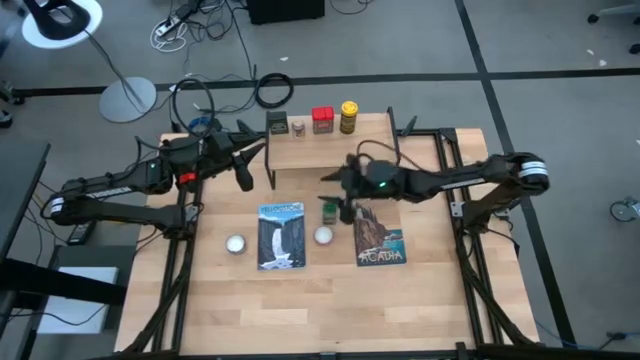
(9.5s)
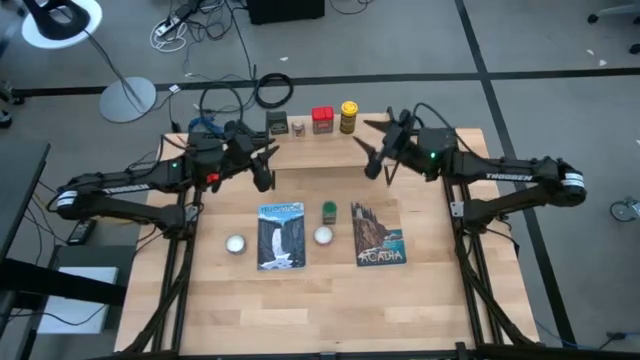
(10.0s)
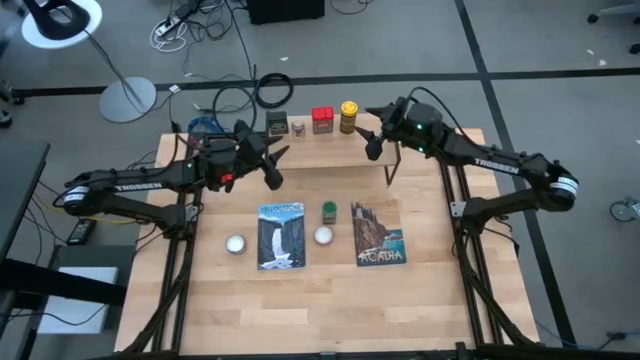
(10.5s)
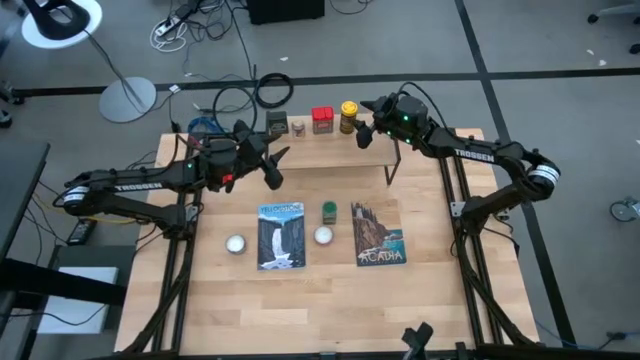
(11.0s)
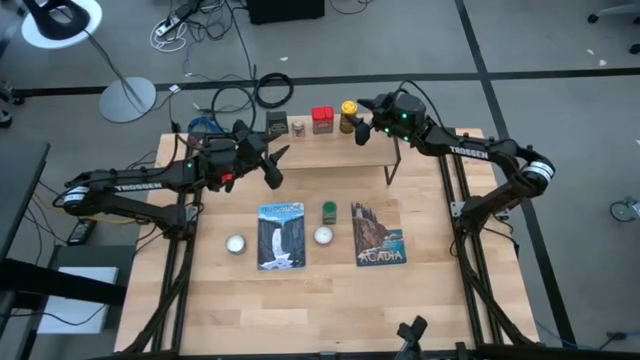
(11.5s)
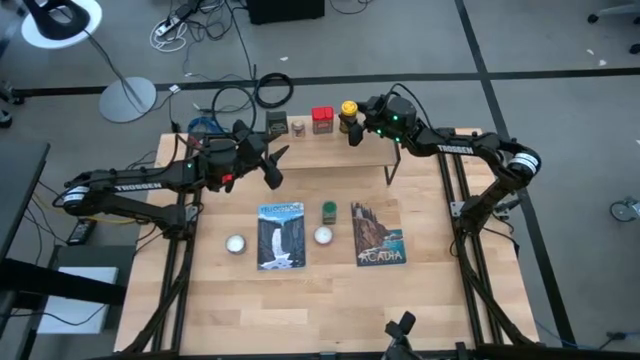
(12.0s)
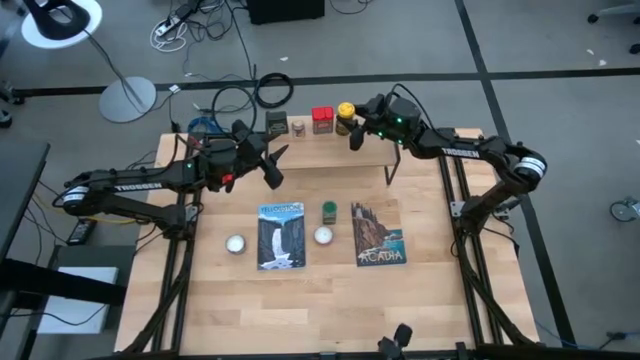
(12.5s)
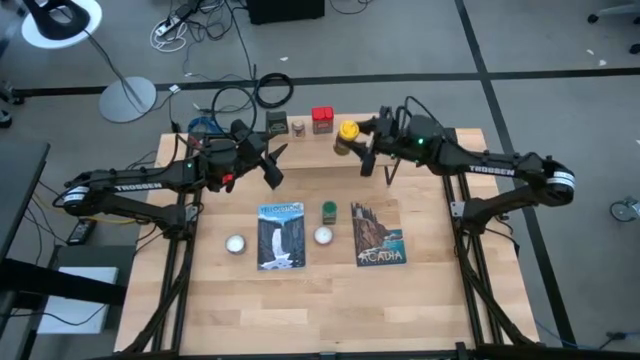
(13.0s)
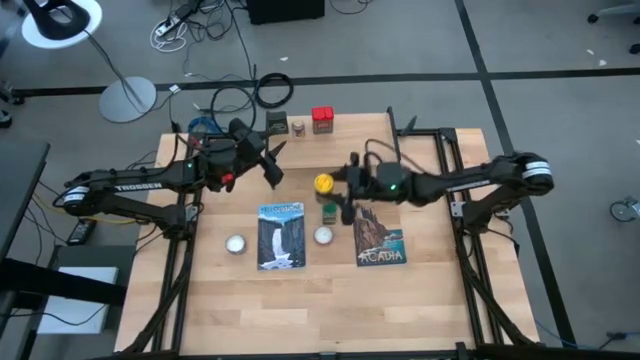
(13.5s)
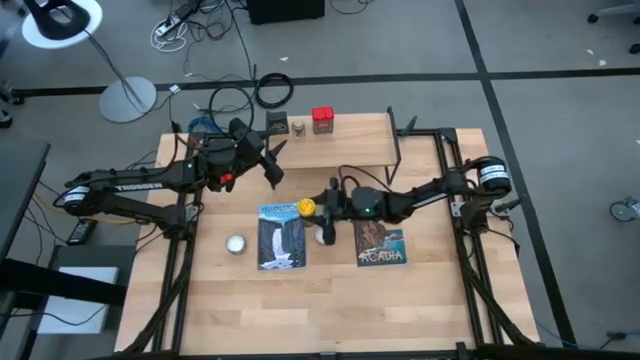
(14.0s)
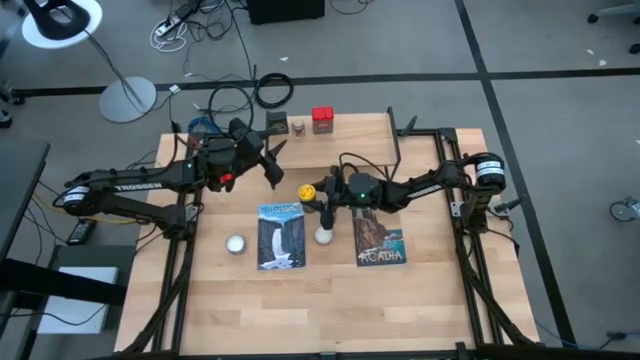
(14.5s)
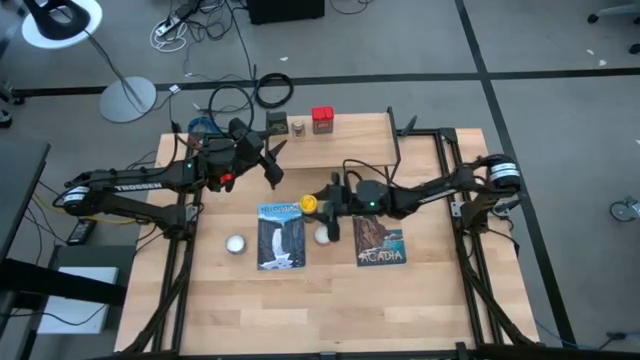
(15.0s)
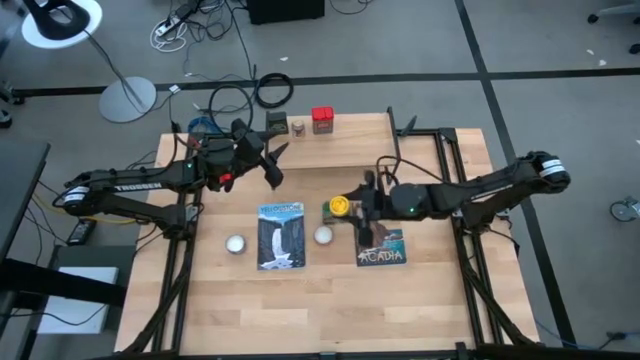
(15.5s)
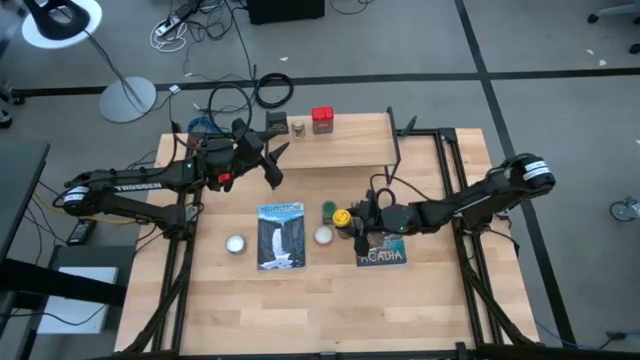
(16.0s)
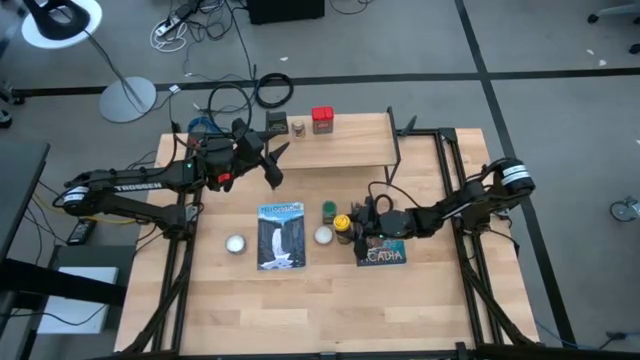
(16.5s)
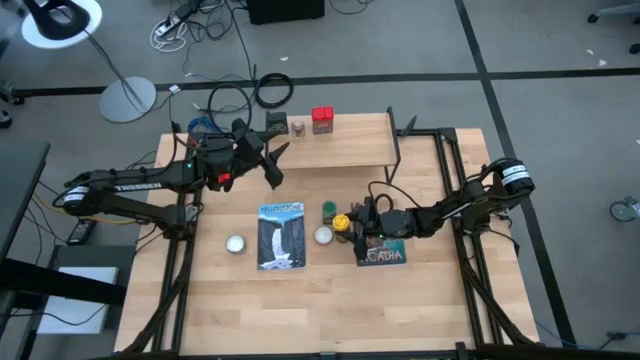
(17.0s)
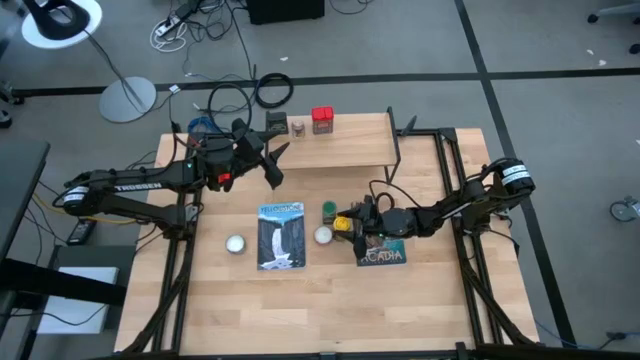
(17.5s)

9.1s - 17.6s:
Task: Shelf spices
Remove the yellow spice from the shelf

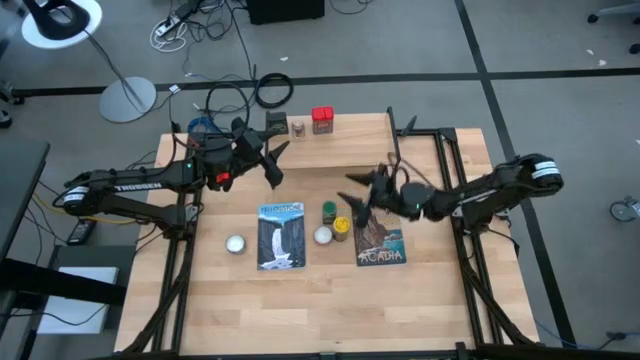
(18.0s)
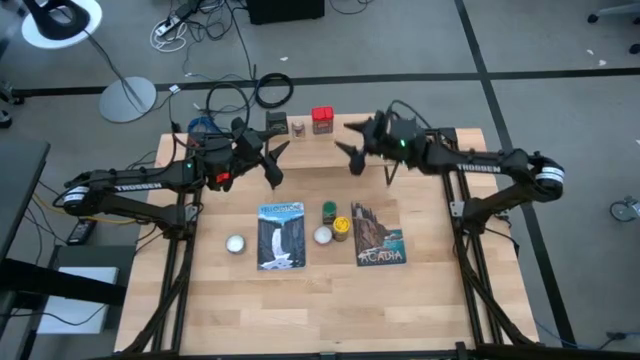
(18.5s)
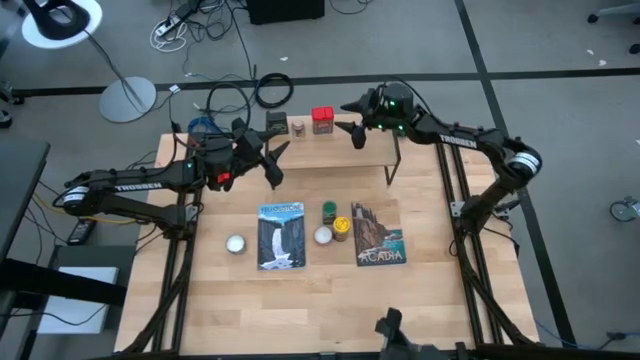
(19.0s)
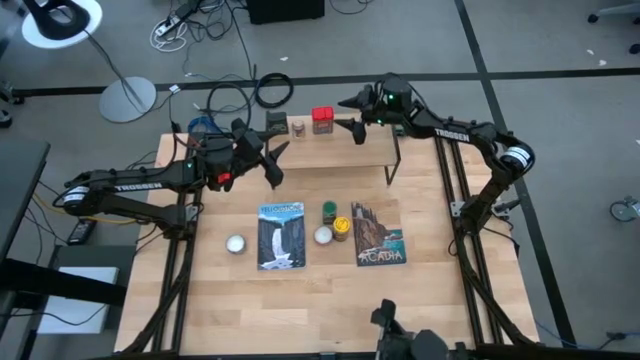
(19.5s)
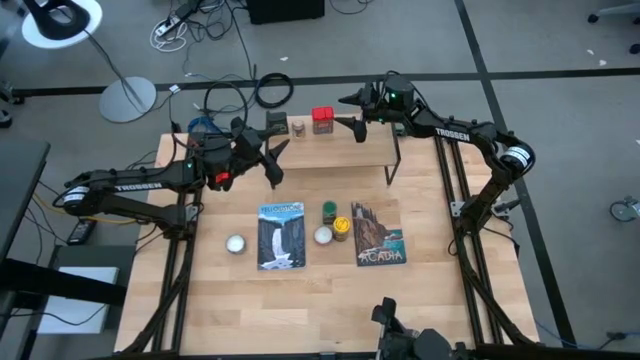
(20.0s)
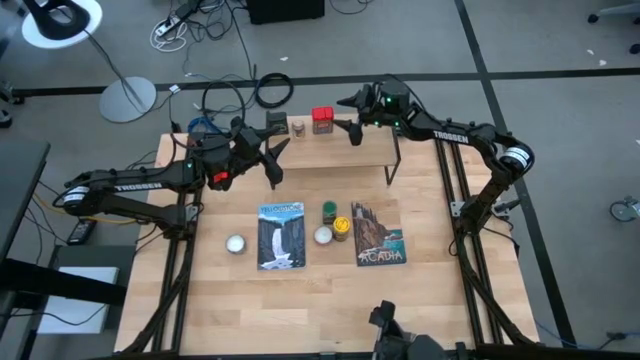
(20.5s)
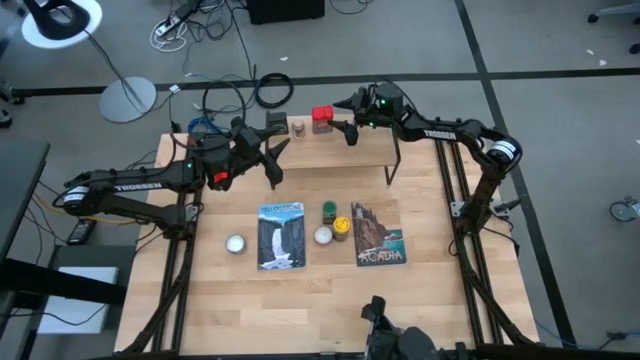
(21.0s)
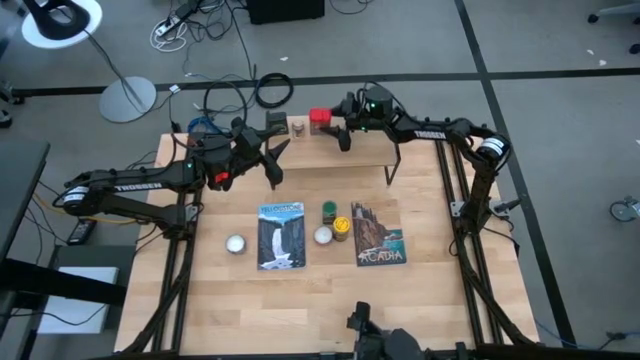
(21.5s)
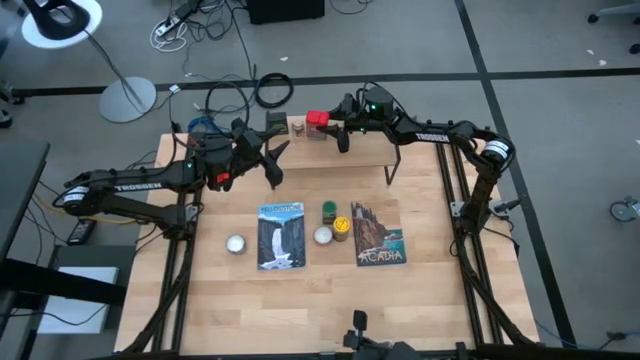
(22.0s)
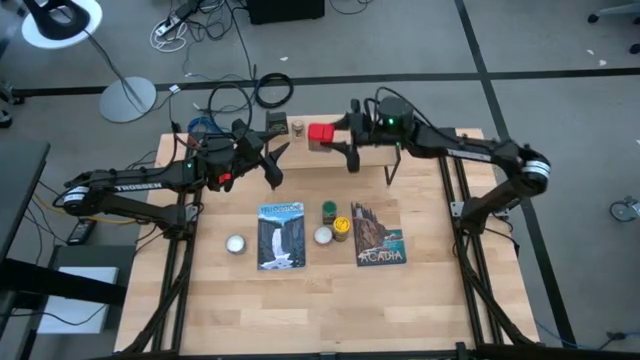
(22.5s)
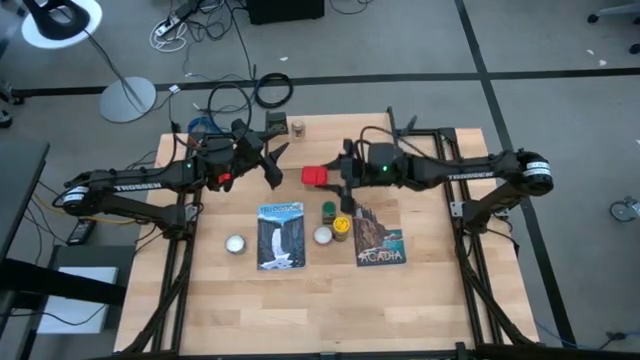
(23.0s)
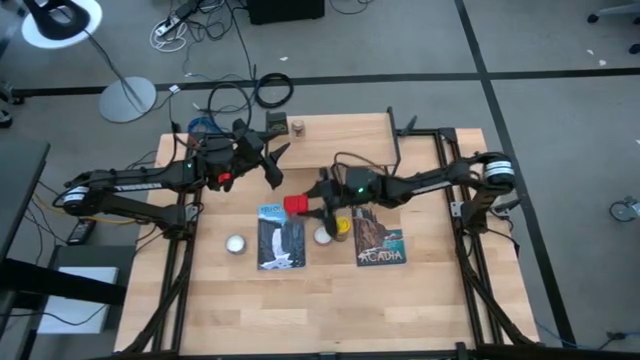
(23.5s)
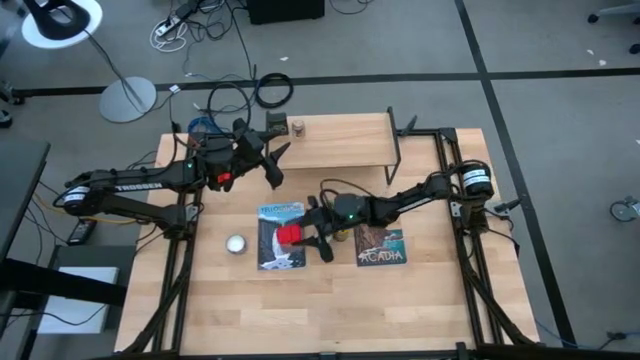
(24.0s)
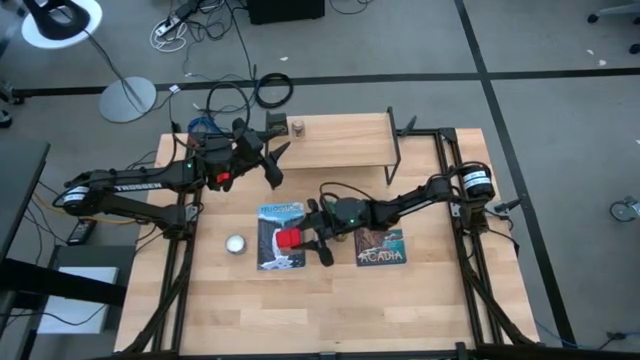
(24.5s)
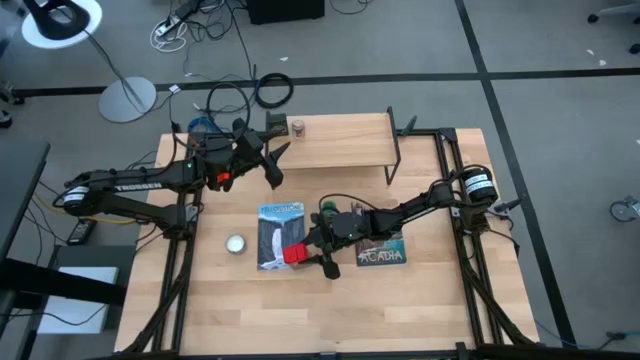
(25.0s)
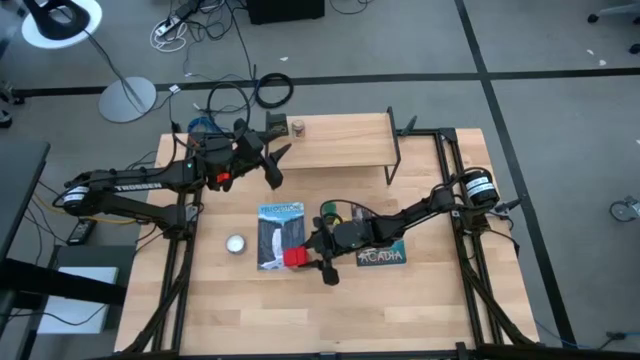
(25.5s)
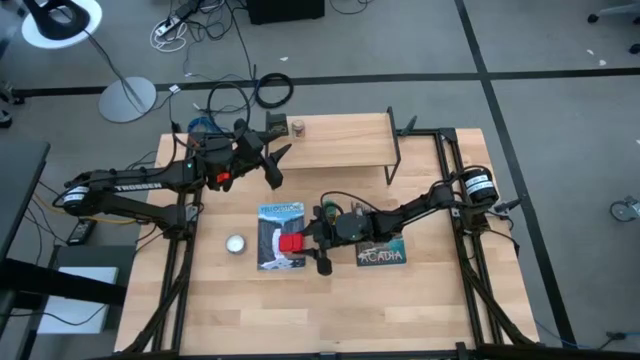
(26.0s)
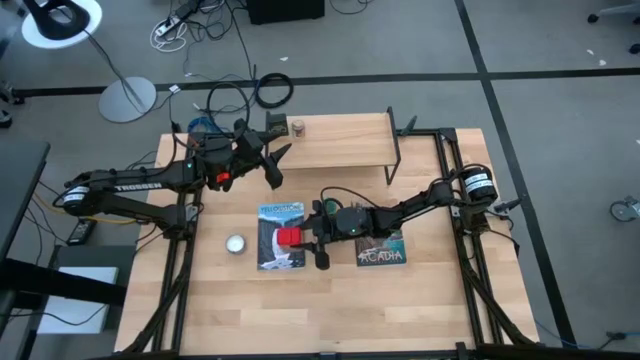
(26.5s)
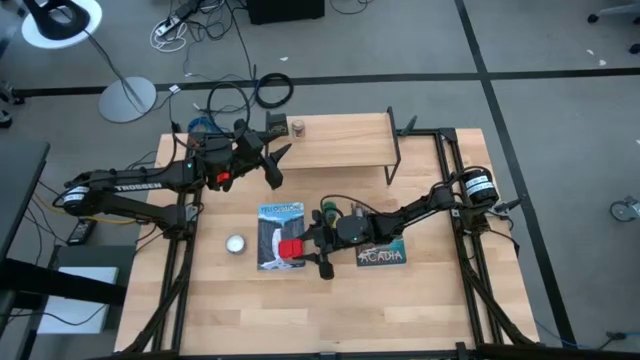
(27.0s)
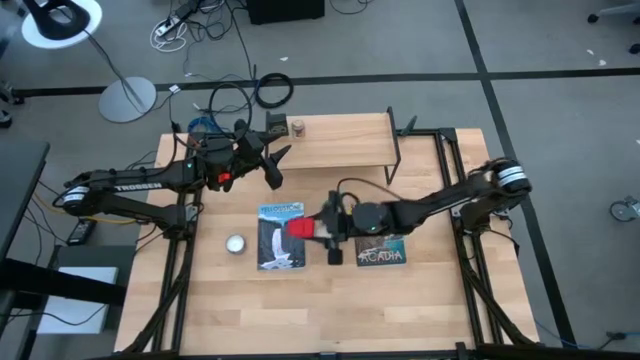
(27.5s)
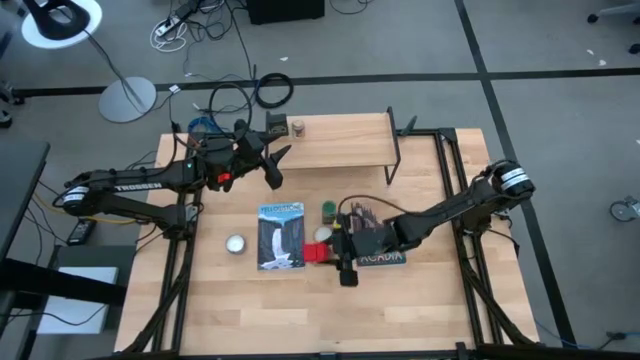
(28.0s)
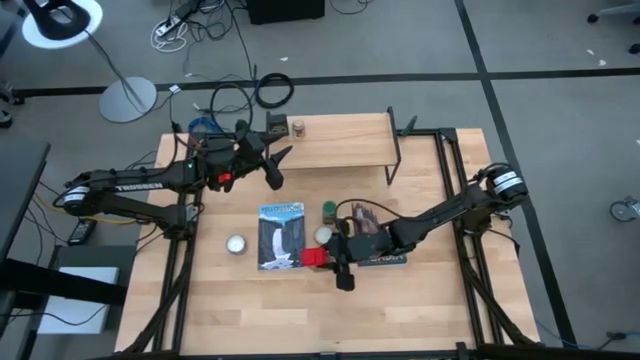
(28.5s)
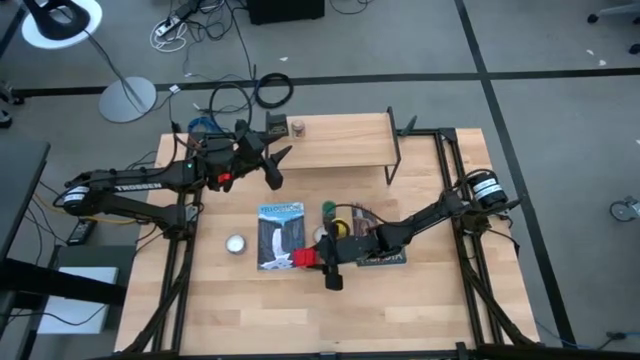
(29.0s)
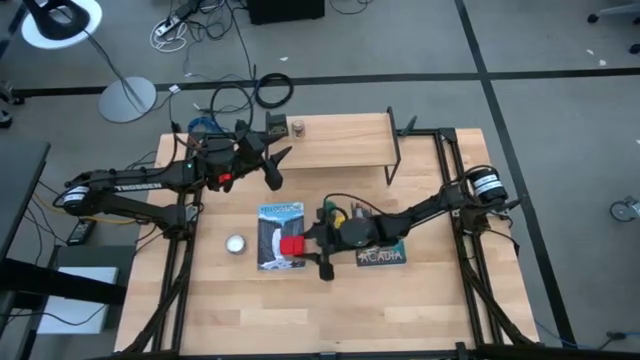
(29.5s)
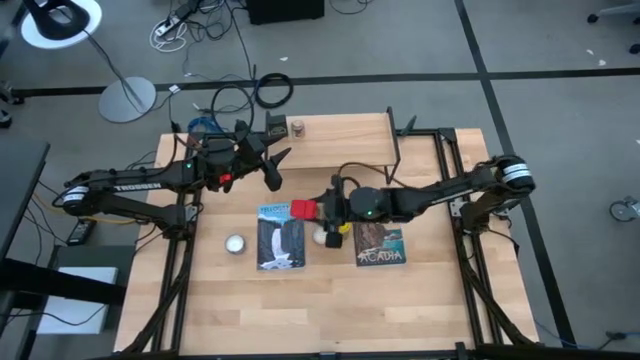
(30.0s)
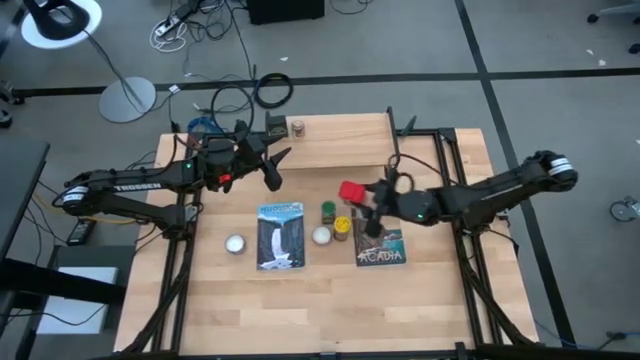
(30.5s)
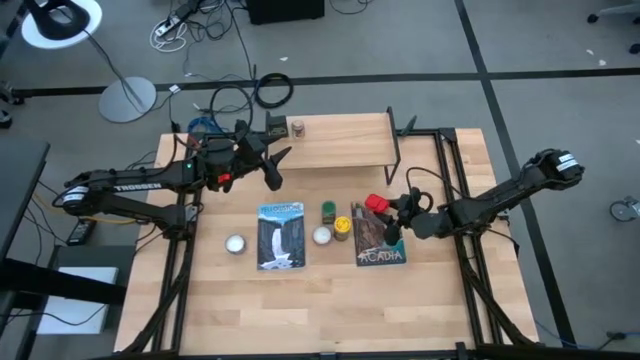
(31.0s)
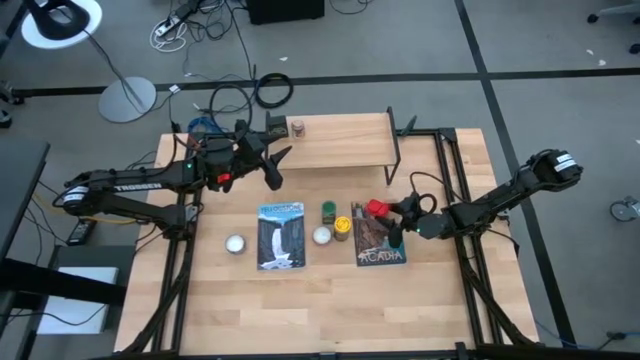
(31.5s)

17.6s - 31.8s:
Remove the red spice from the shelf
